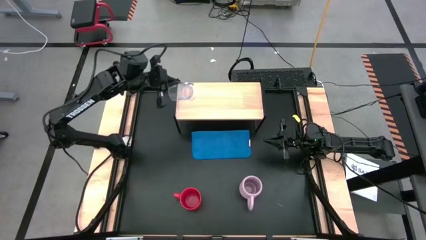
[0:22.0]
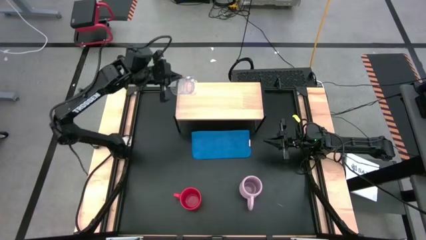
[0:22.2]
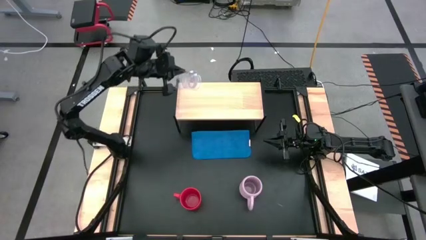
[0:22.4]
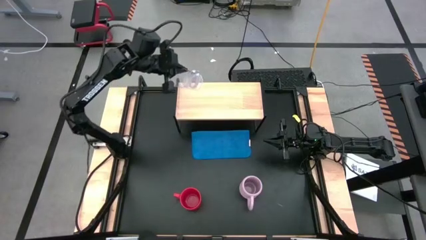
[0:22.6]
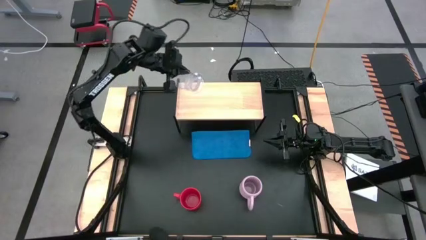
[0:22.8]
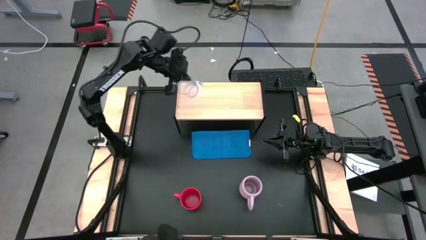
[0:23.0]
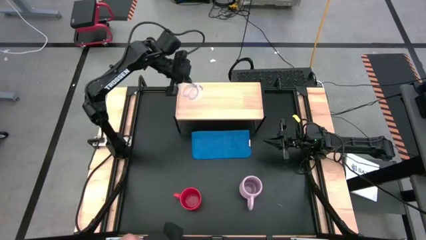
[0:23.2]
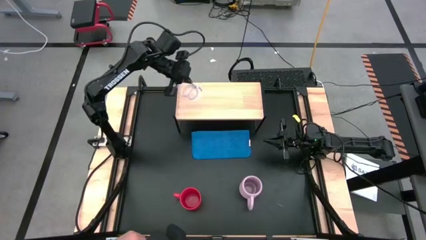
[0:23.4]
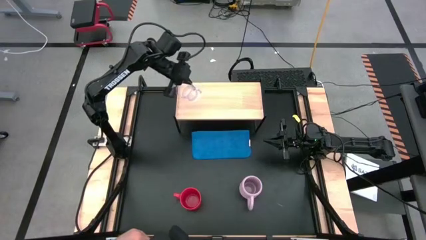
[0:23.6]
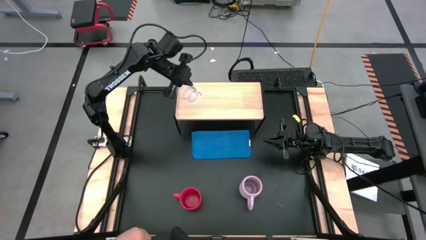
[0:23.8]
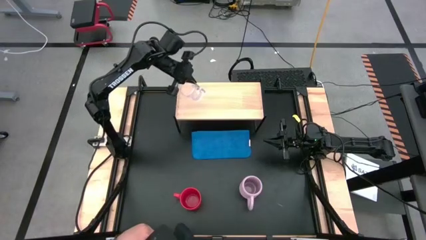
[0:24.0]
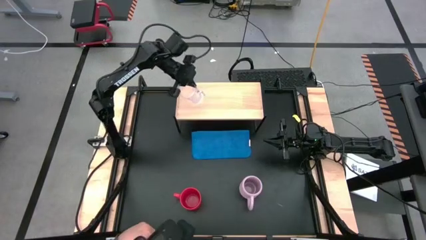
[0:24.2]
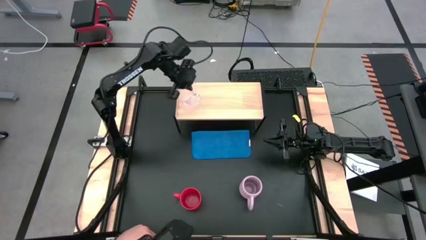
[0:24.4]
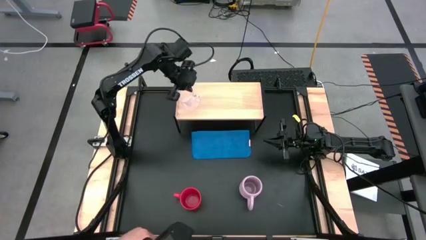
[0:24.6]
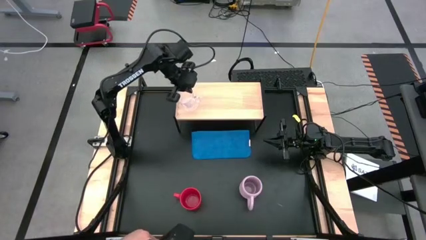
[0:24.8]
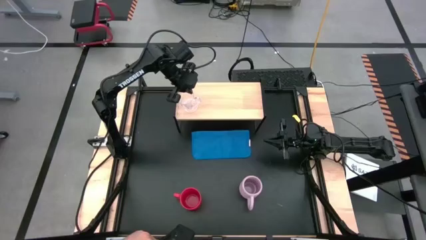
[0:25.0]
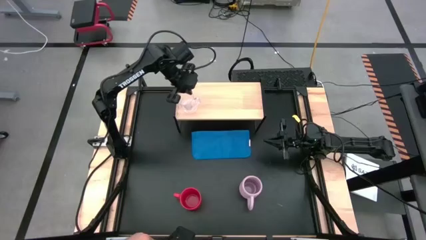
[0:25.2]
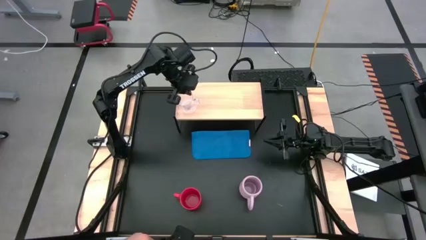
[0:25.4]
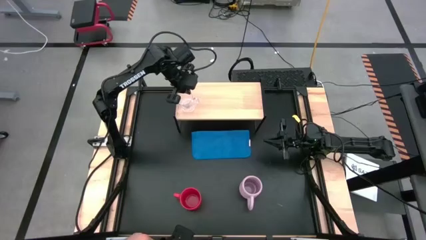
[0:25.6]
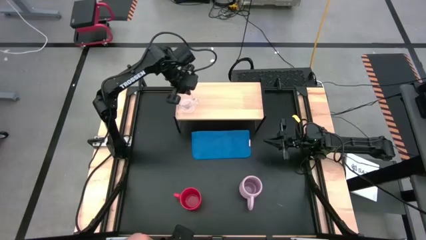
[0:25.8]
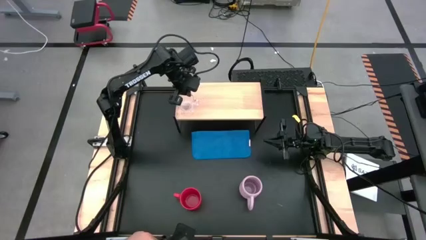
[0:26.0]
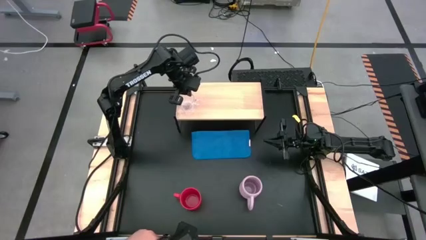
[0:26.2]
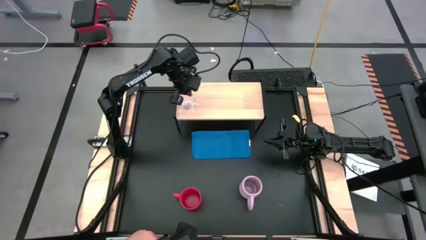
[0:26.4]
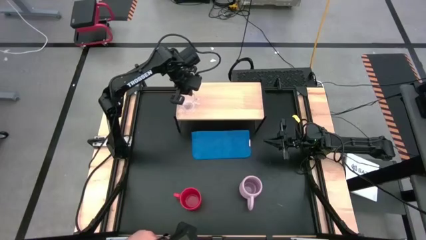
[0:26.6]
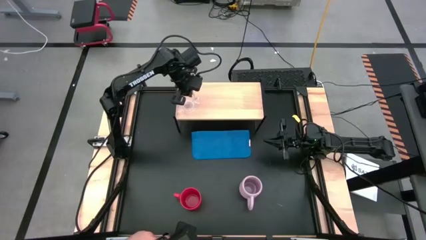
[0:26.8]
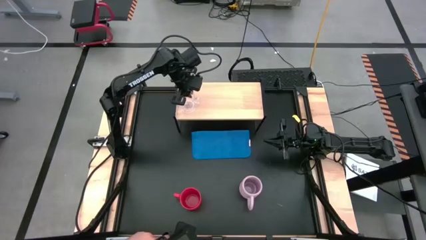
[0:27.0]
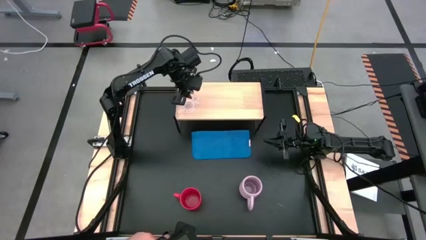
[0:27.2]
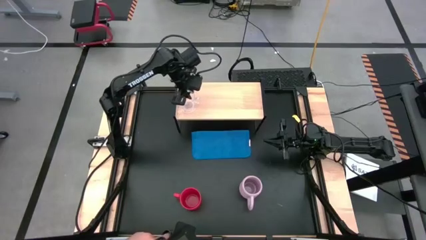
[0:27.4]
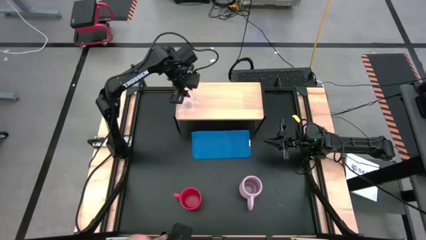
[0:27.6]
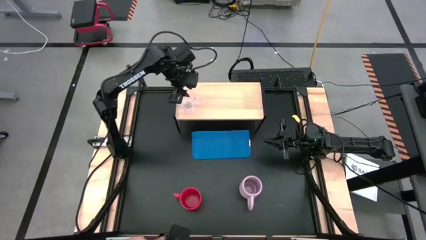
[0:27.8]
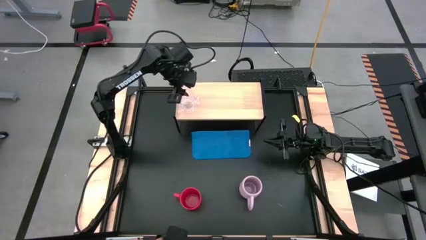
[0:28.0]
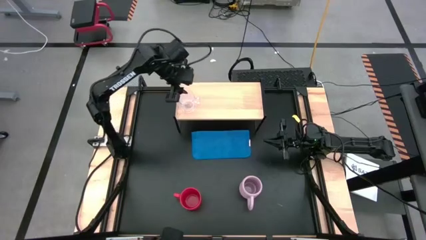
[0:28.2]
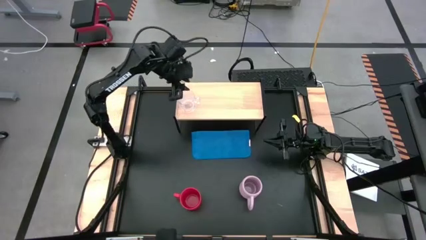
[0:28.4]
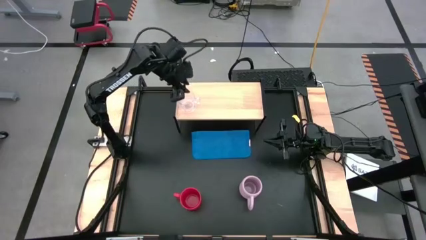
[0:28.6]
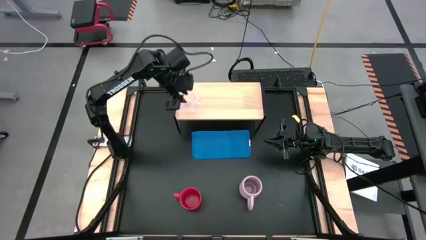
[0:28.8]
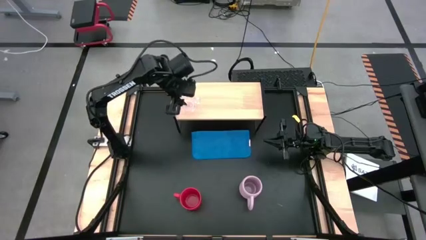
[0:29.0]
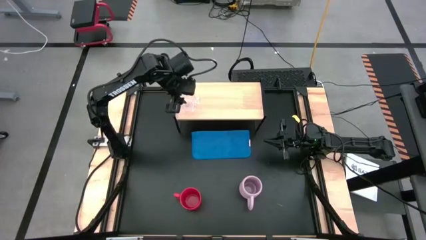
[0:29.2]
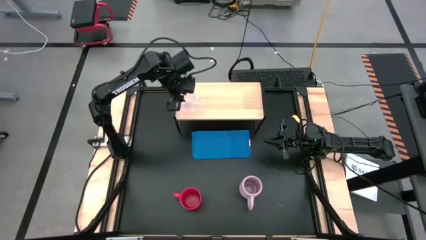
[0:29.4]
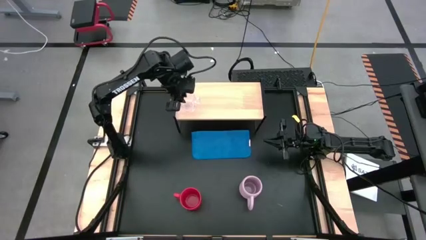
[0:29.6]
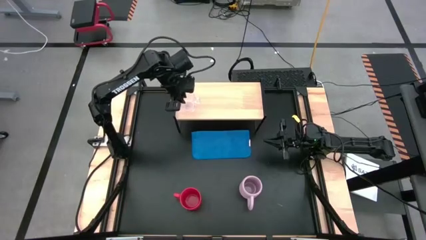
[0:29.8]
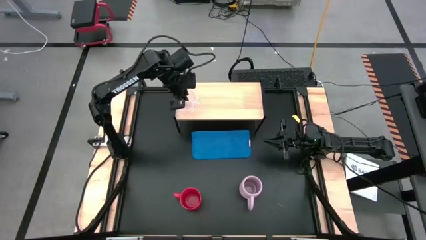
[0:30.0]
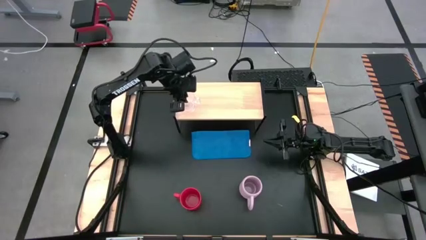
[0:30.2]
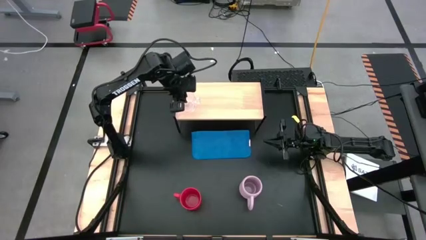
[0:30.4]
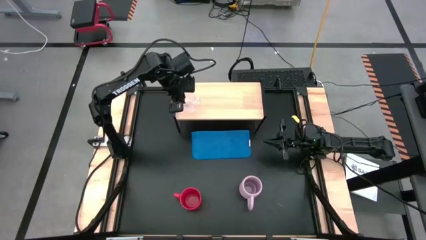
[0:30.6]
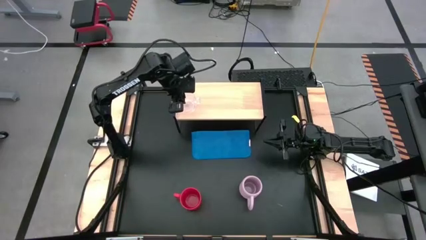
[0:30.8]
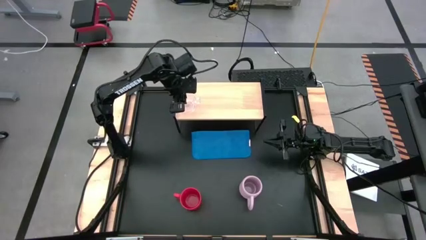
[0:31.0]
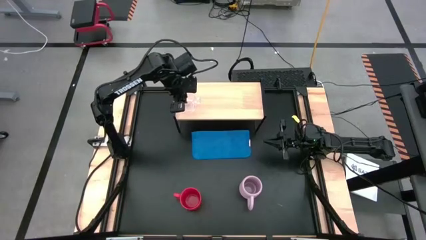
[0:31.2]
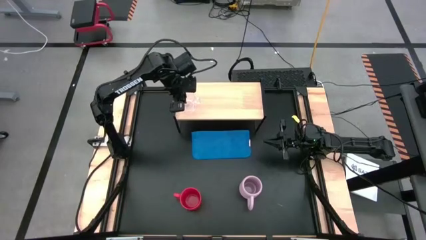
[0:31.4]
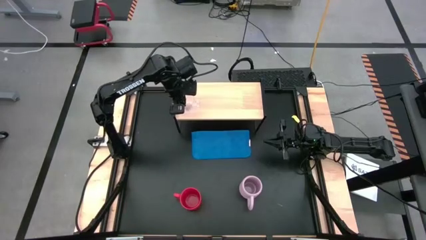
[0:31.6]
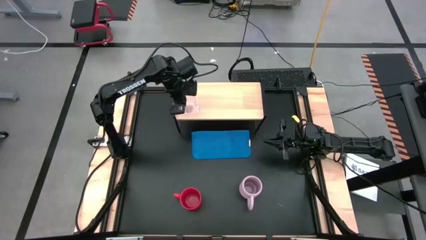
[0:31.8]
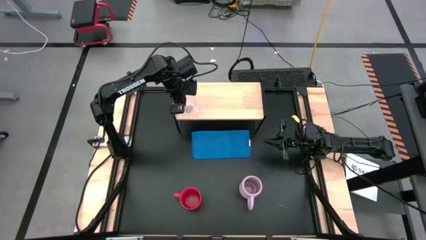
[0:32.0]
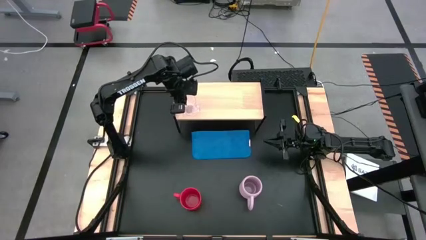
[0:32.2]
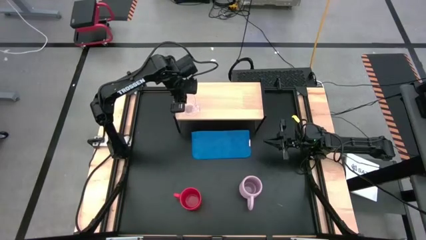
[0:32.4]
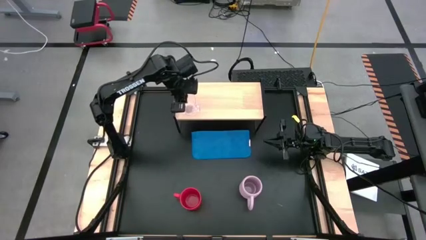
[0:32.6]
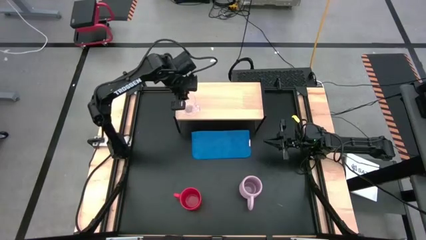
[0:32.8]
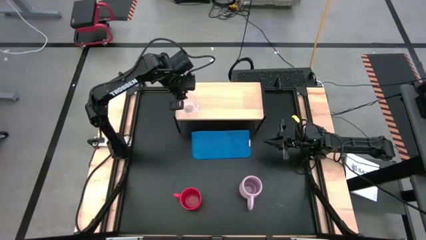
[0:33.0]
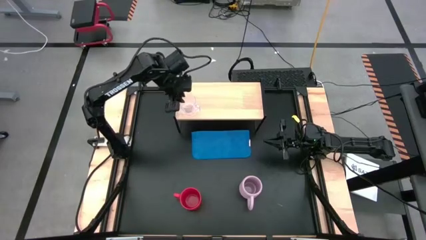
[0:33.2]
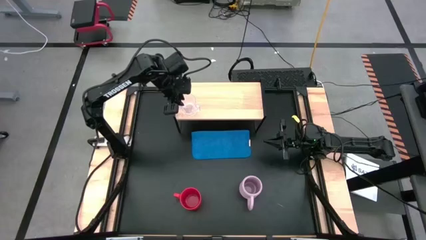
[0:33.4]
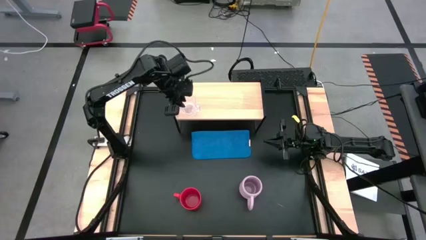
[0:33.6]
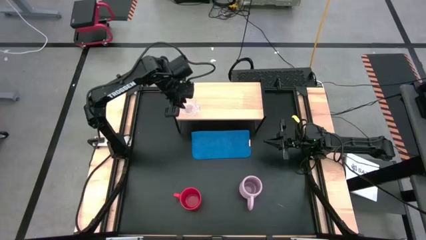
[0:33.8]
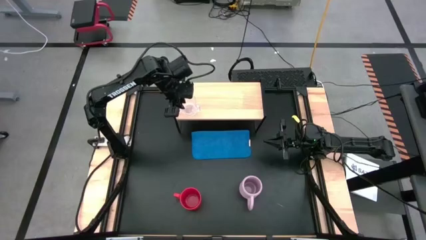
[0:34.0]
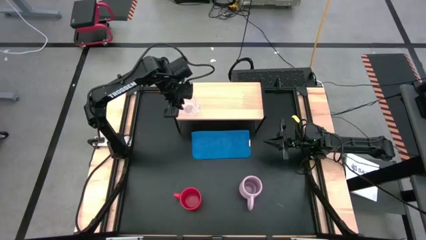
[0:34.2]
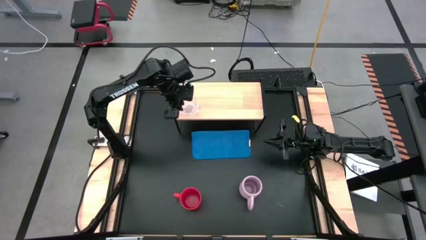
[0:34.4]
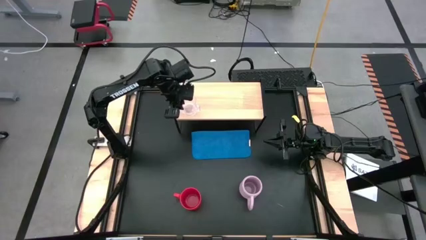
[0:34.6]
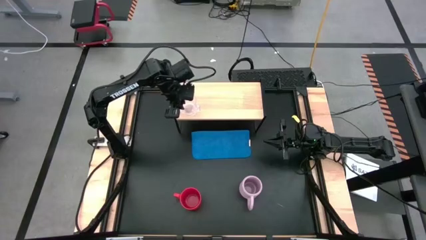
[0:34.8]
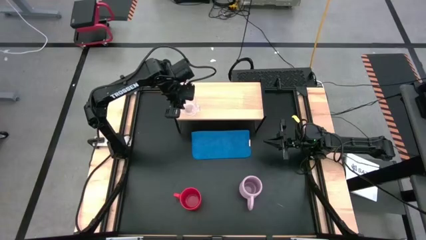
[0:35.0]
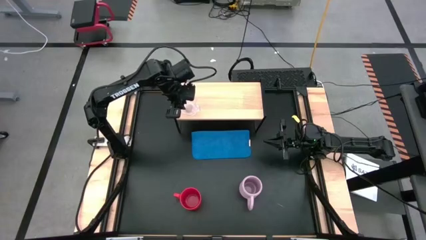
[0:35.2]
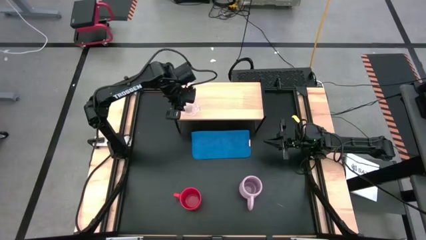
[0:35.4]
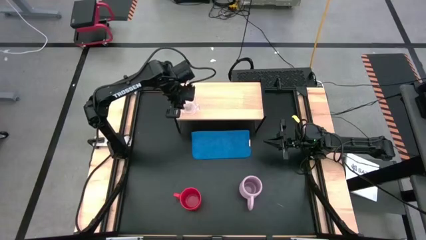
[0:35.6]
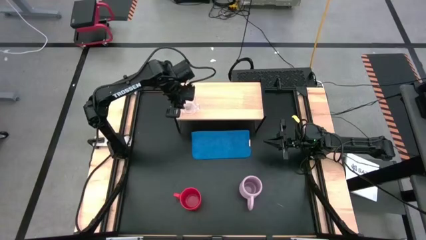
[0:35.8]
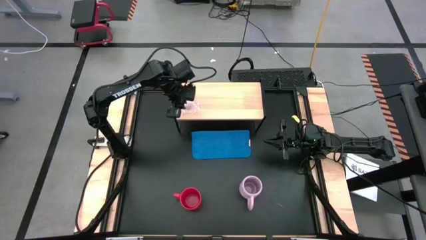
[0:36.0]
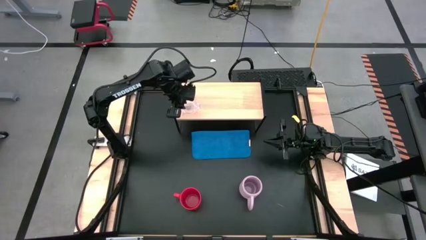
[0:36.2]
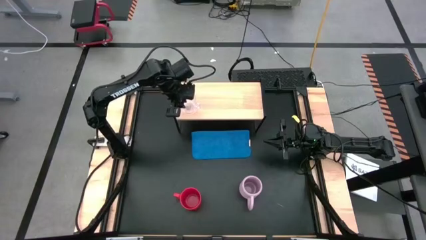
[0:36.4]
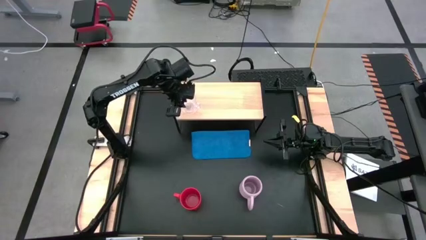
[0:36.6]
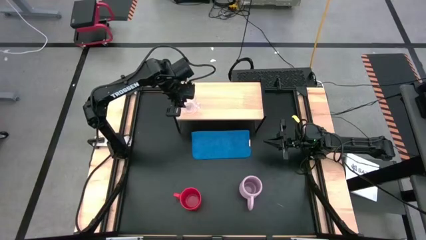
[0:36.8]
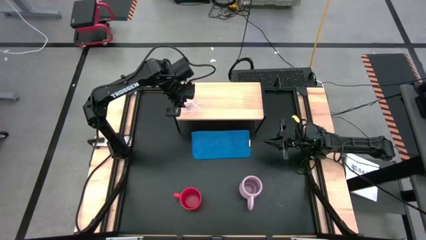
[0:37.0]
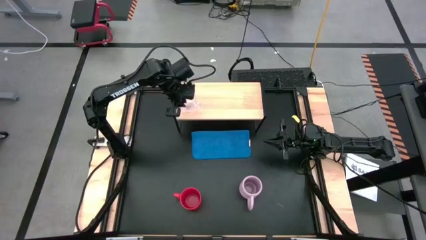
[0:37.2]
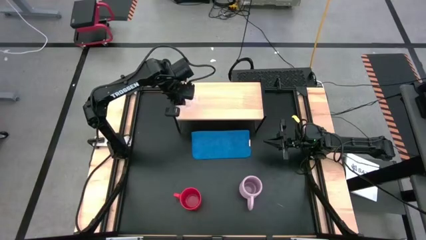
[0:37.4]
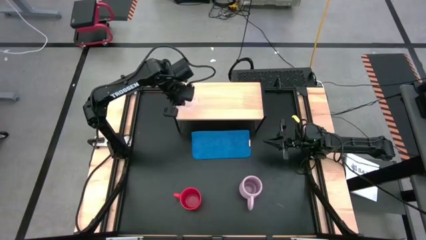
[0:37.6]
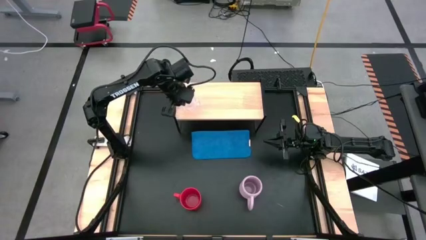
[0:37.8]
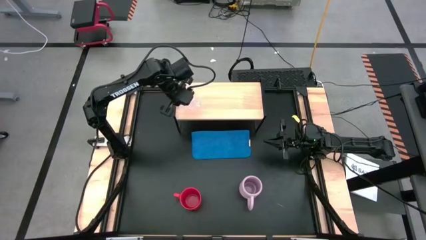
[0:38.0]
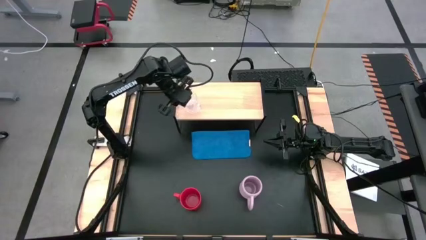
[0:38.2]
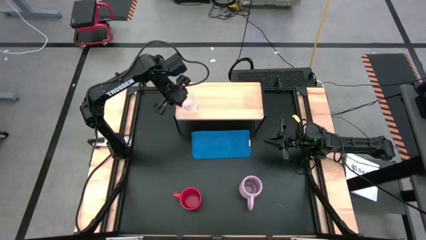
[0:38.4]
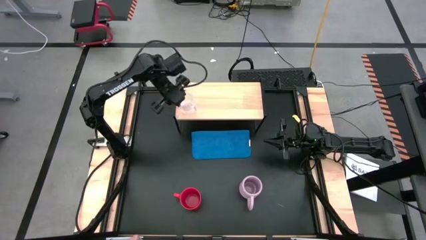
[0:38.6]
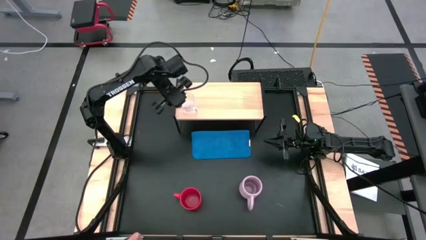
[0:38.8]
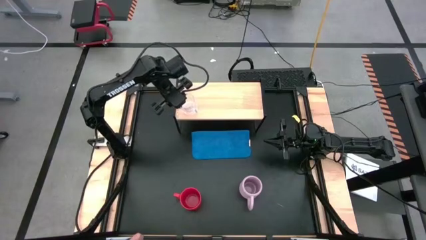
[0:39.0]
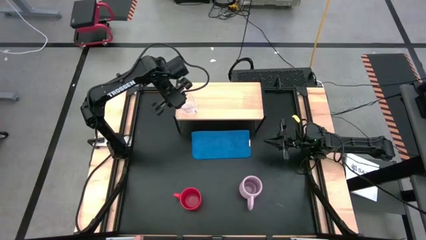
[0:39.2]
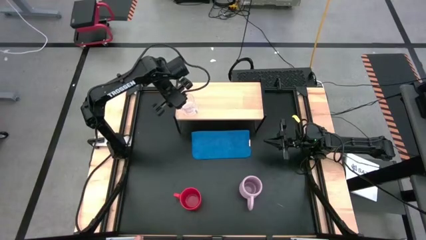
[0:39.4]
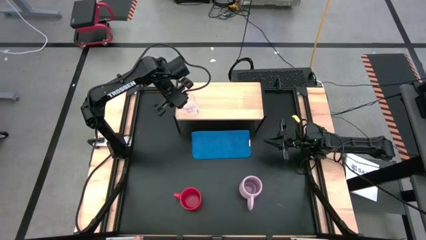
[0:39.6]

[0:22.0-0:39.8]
Task: Stack small to large cups/mugs on shelf
Put the glass mug on the shelf
